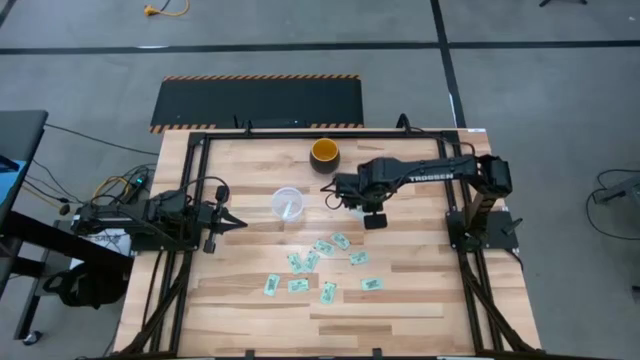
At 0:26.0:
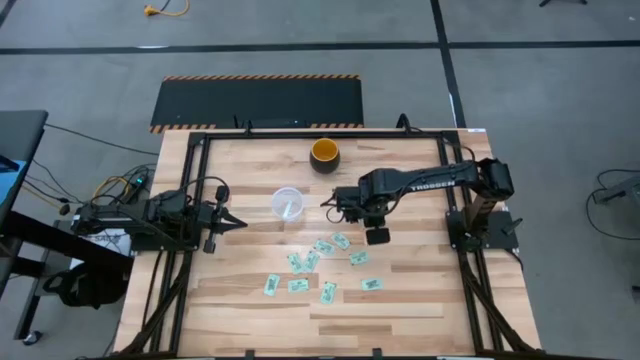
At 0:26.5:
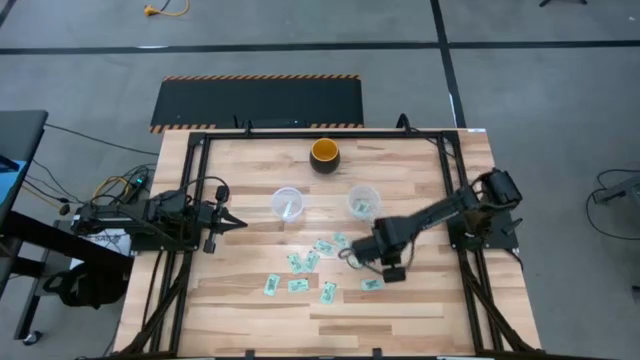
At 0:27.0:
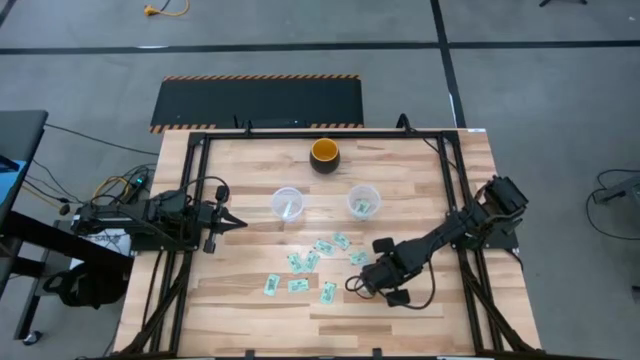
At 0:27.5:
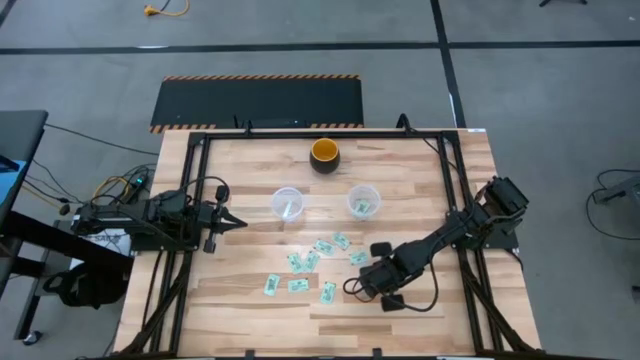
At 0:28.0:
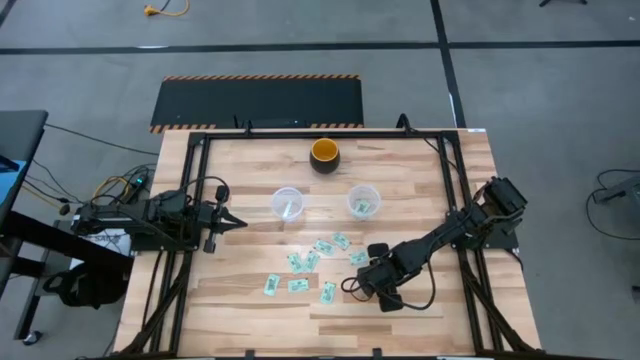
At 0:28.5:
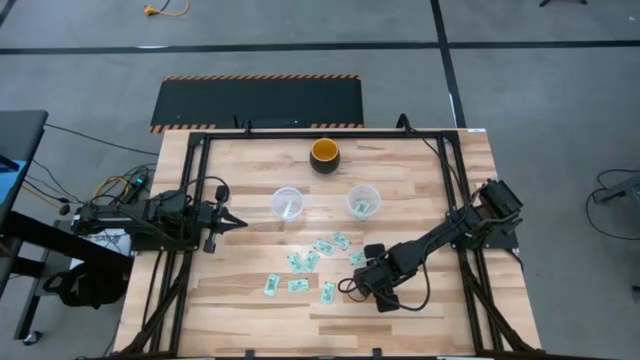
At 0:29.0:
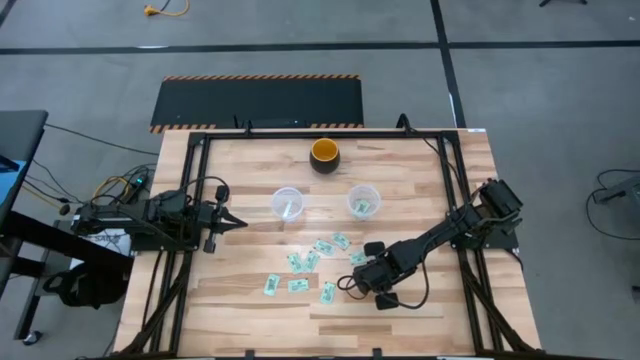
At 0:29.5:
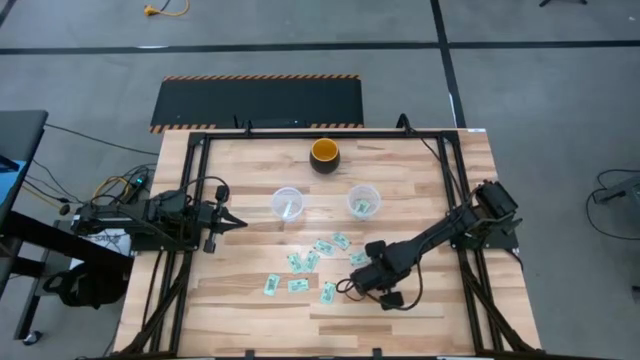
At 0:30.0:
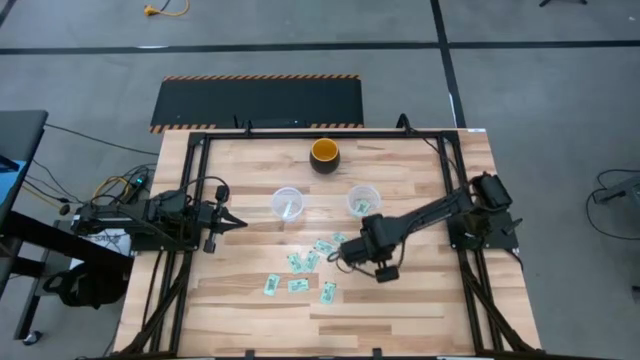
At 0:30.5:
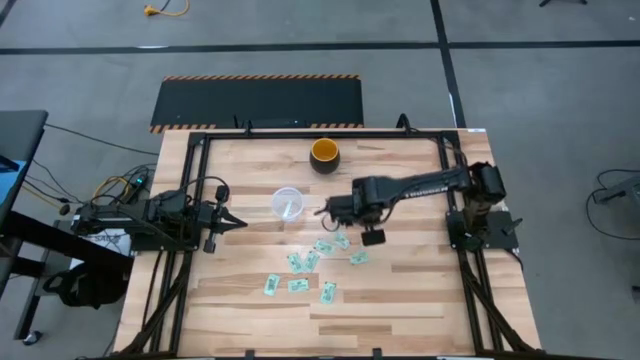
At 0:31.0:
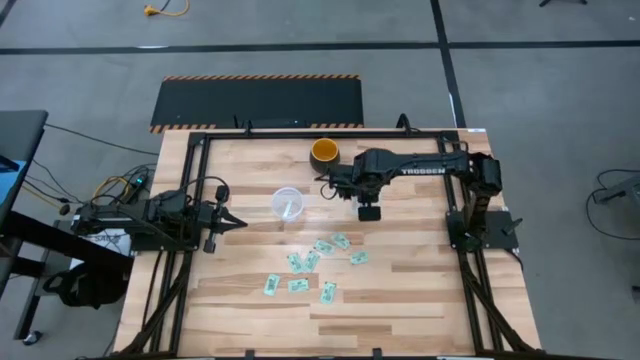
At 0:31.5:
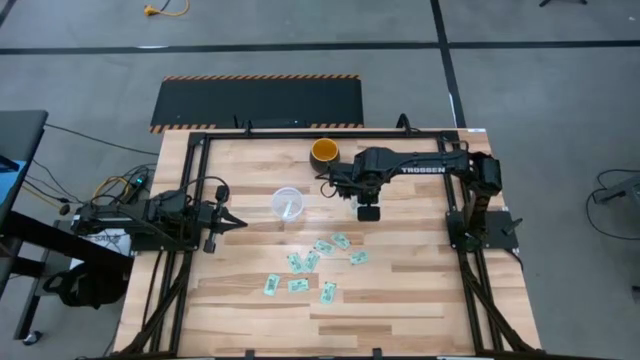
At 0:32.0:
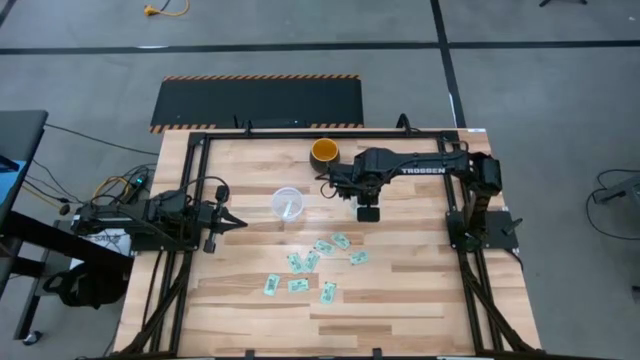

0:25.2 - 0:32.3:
Task: Pick and place Stevia / Truvia into bins
Put the stevia packet into the right transparent container

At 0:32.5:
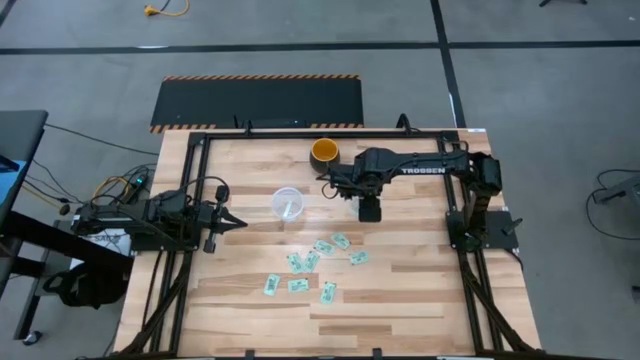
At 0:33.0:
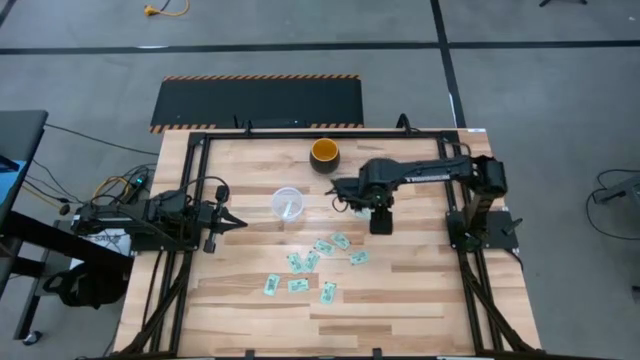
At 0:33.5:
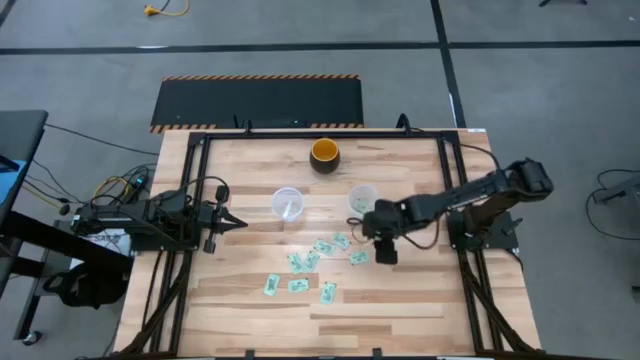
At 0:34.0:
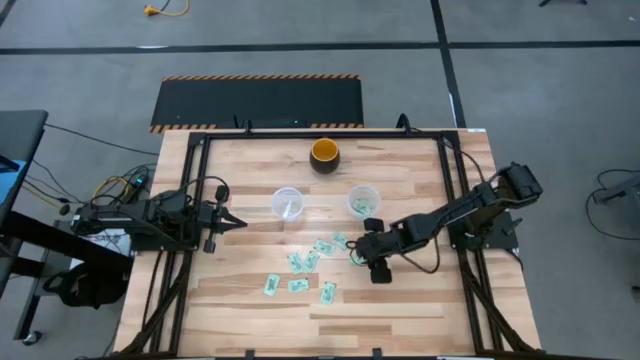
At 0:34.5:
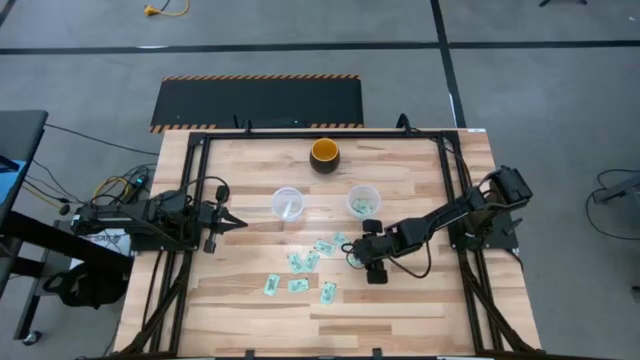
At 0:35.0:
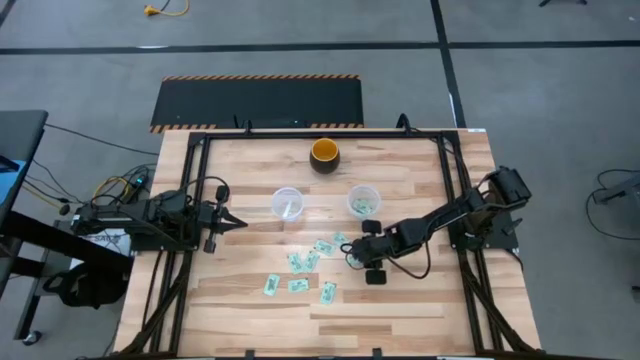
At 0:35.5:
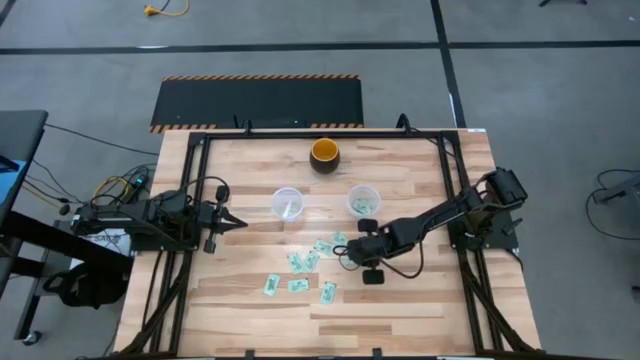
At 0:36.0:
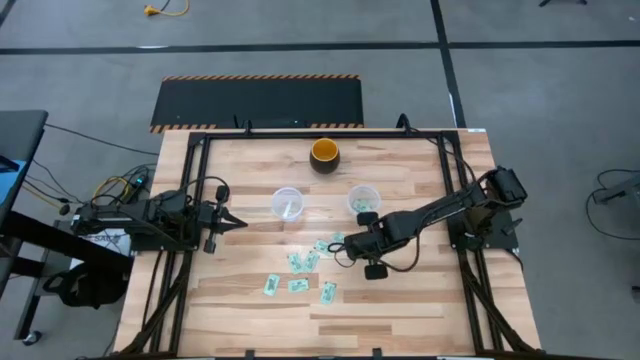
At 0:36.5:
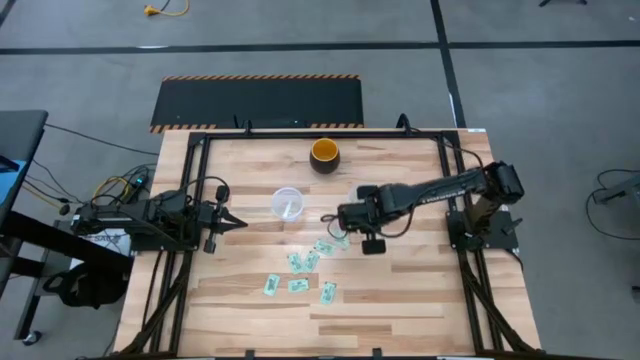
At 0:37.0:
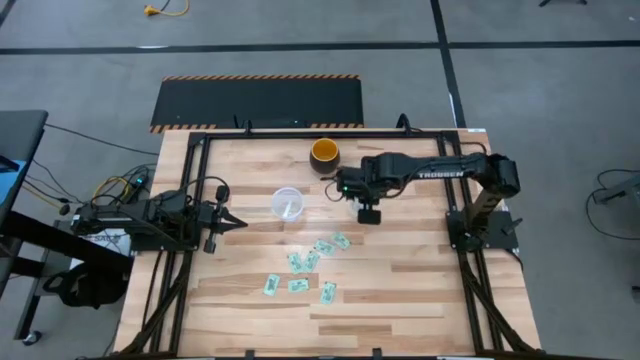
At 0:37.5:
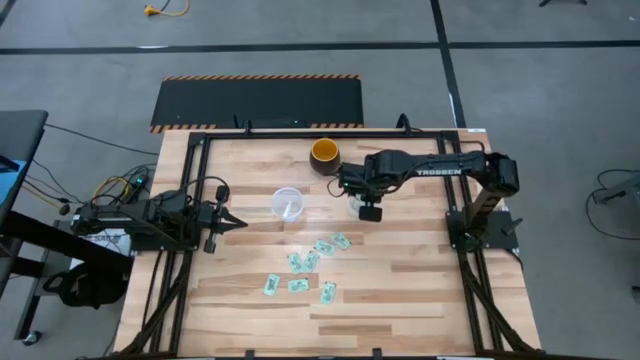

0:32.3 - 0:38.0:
Put the stevia packet into the right transparent container

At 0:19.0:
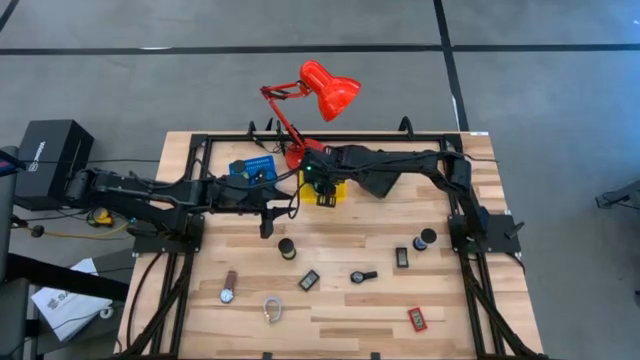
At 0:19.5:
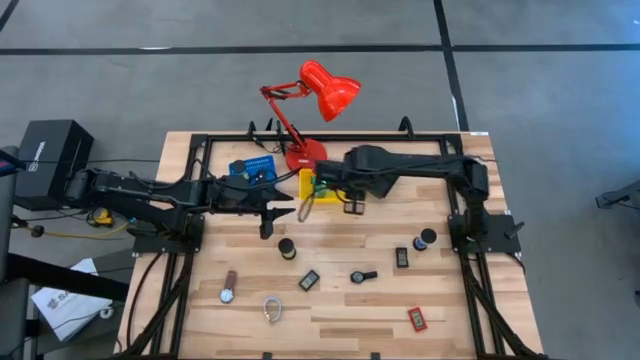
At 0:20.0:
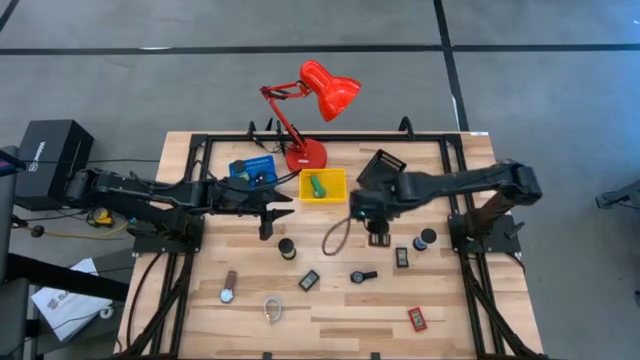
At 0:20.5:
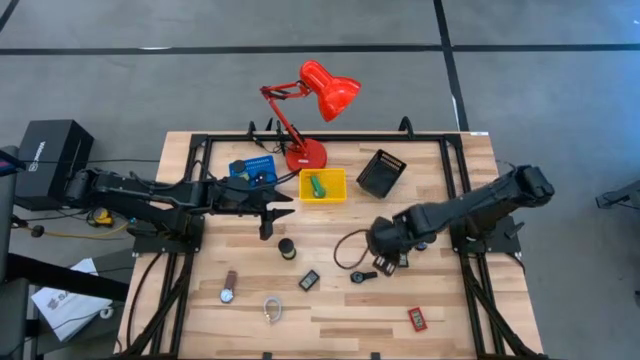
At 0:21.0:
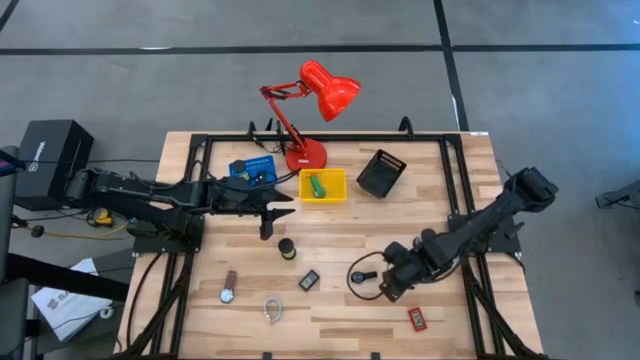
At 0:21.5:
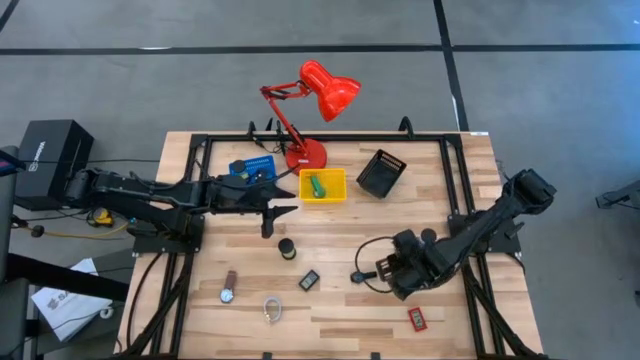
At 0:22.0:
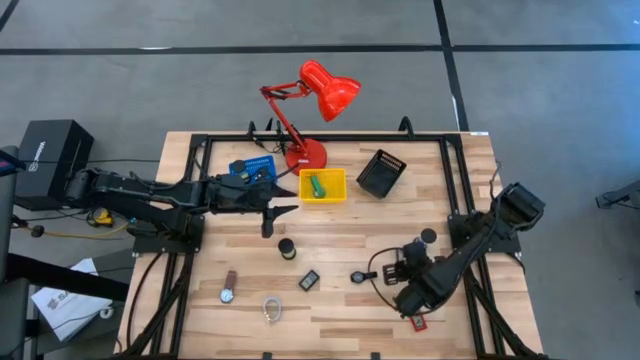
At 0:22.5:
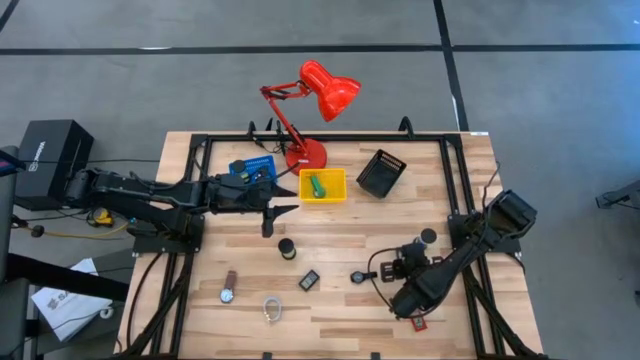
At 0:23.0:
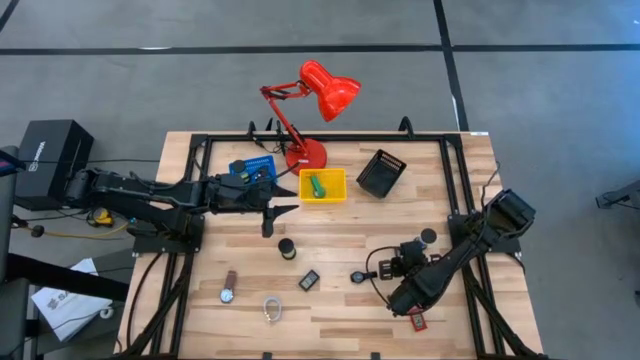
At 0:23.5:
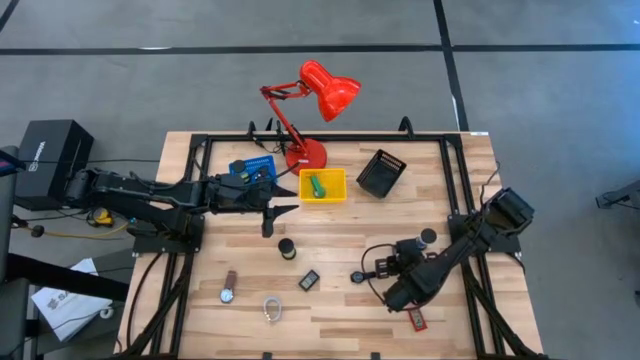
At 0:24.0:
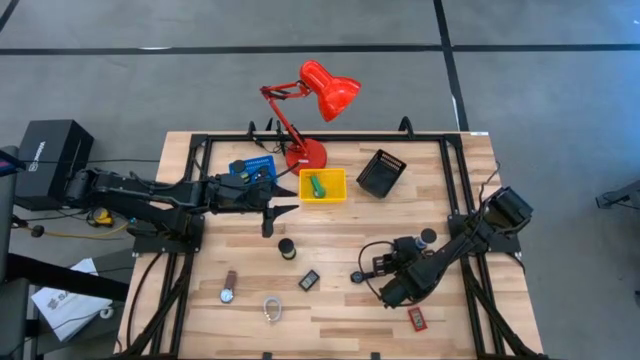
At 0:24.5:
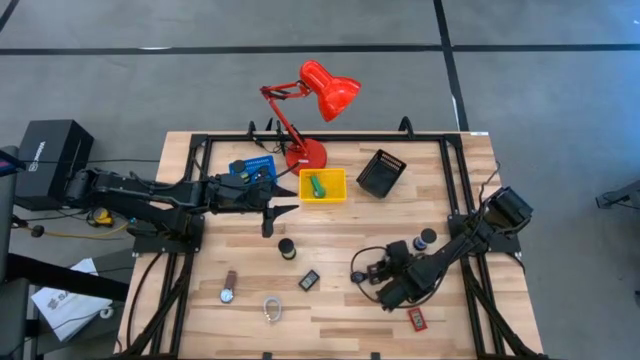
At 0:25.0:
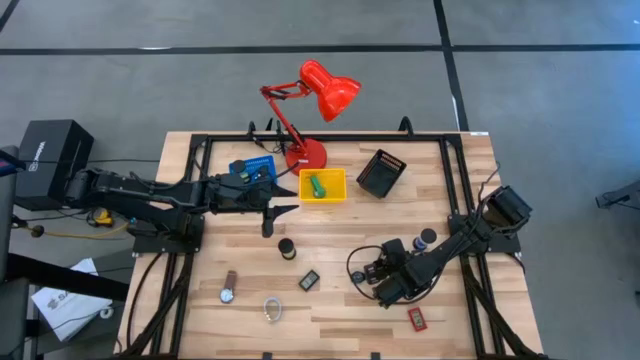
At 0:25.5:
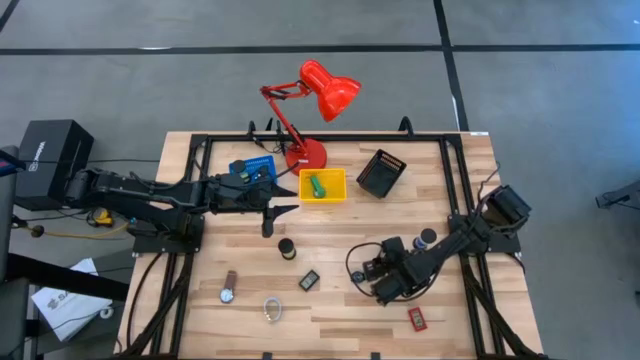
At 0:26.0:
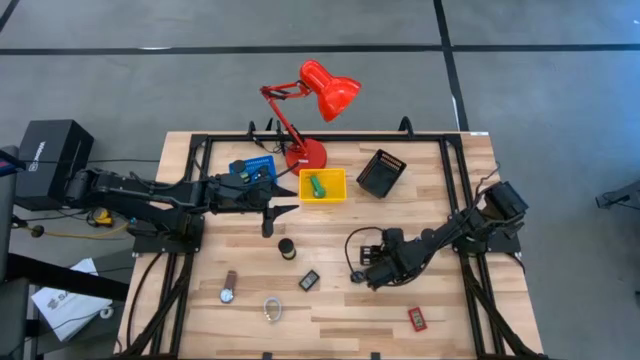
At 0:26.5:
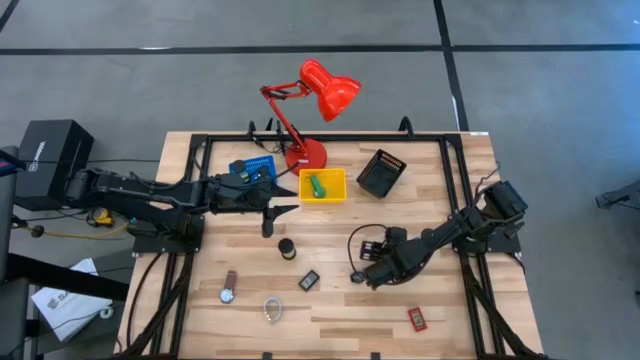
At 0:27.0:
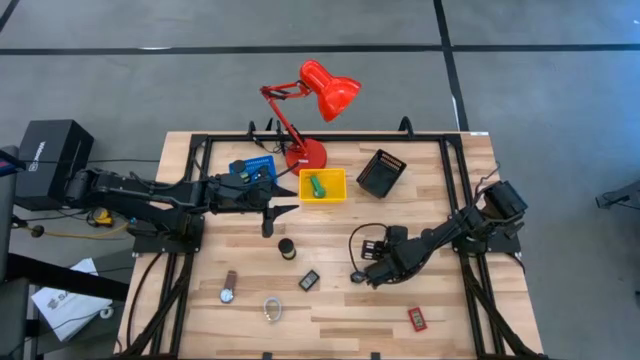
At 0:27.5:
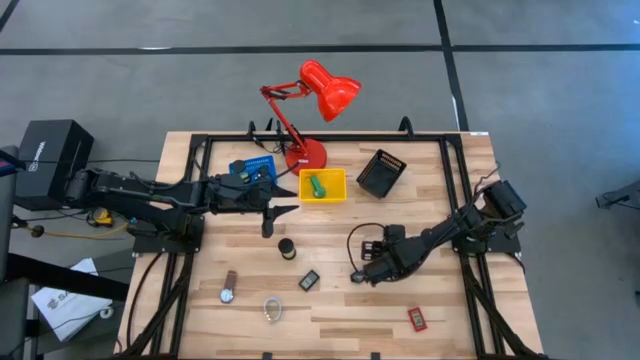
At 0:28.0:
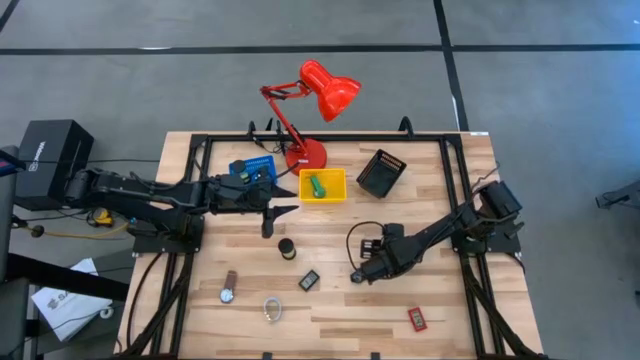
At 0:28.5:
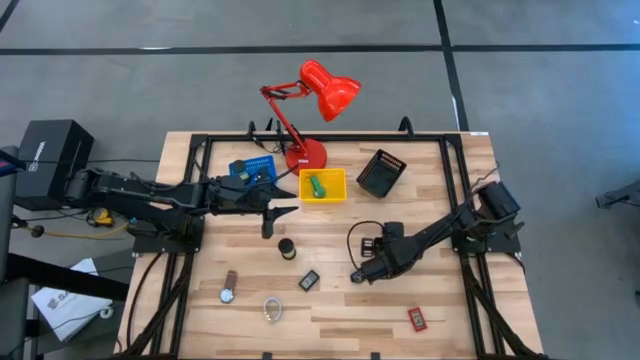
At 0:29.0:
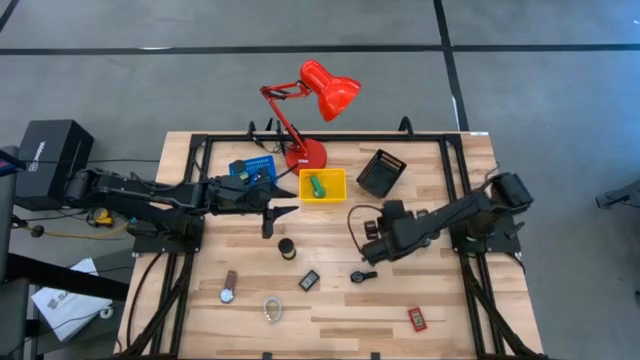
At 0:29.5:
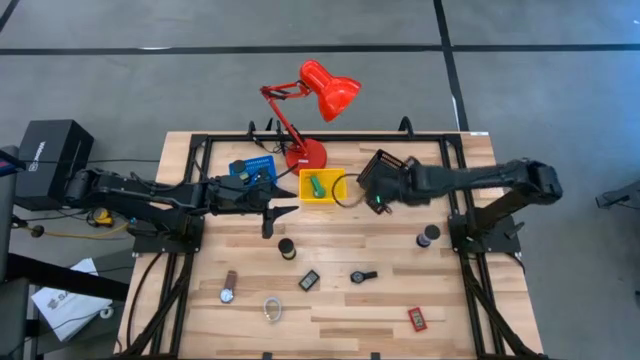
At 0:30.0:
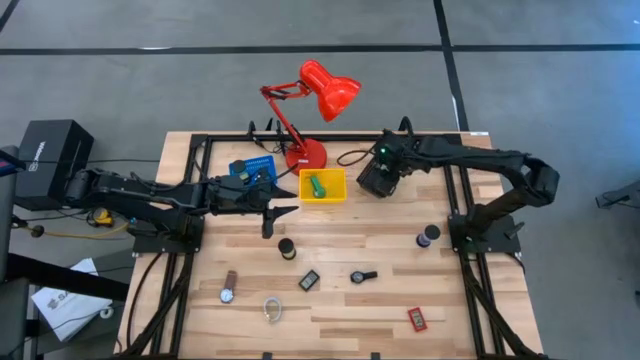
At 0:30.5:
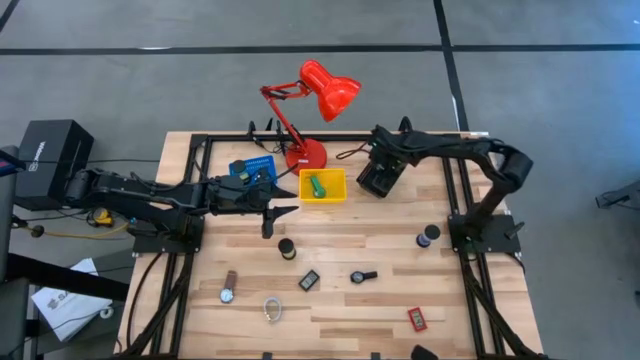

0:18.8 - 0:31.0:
Task: Pick & Place Office items
Put the top black digital clock into the black bin
